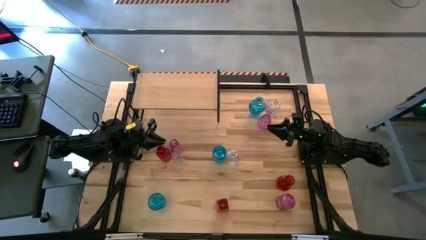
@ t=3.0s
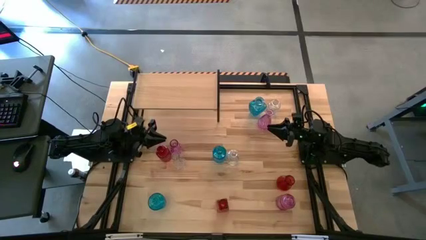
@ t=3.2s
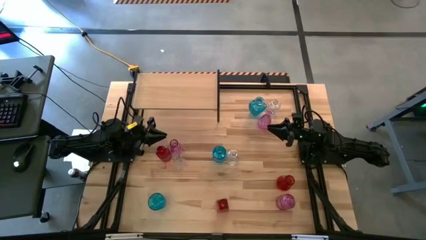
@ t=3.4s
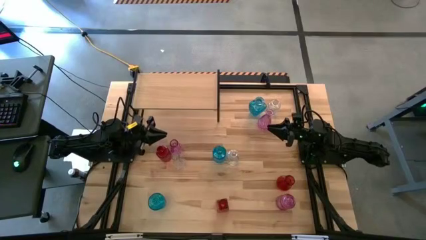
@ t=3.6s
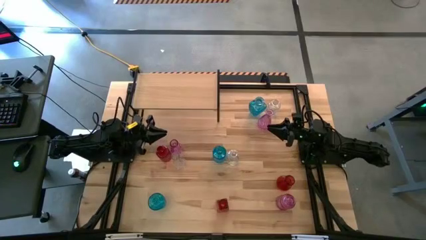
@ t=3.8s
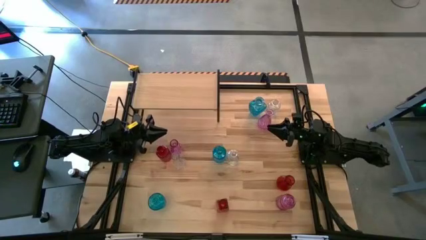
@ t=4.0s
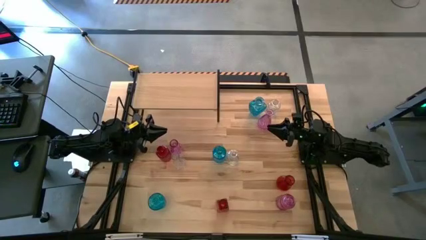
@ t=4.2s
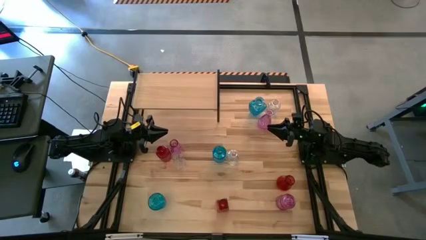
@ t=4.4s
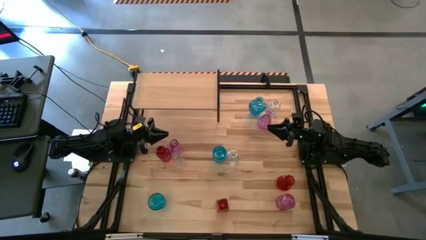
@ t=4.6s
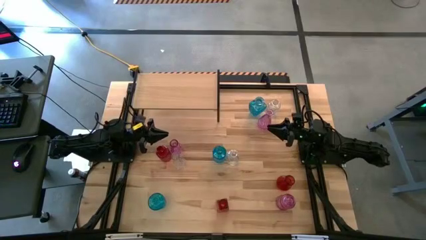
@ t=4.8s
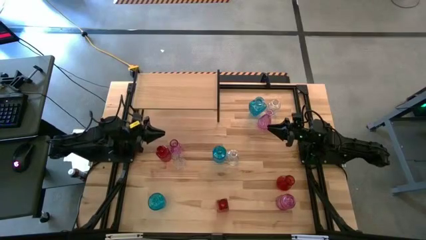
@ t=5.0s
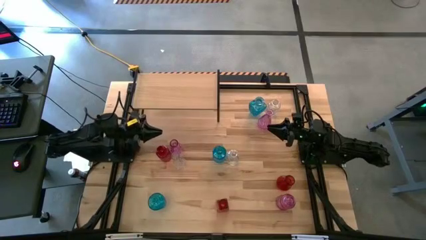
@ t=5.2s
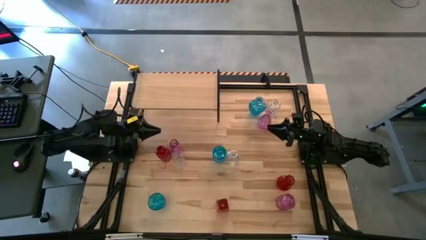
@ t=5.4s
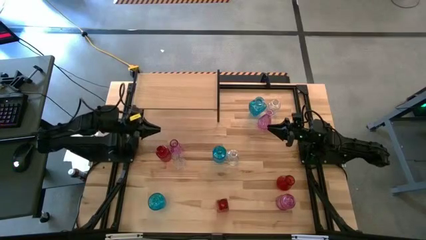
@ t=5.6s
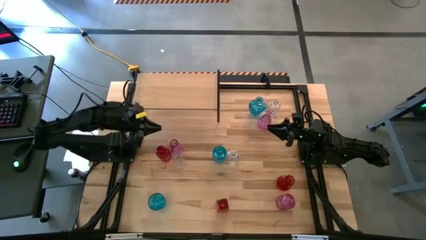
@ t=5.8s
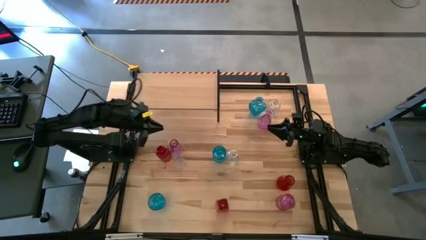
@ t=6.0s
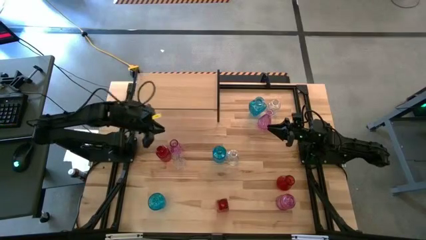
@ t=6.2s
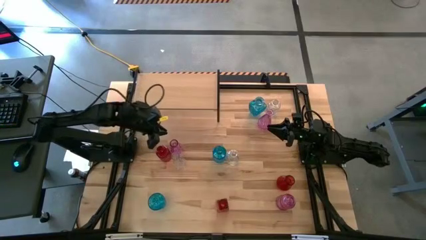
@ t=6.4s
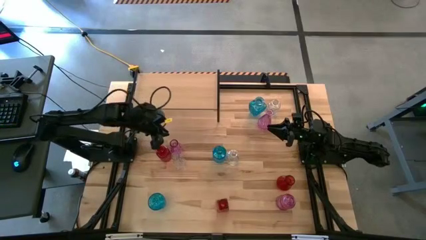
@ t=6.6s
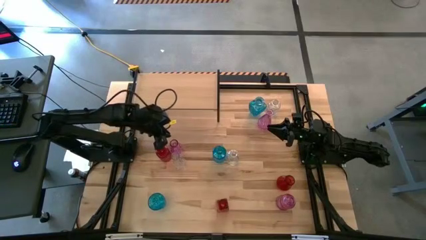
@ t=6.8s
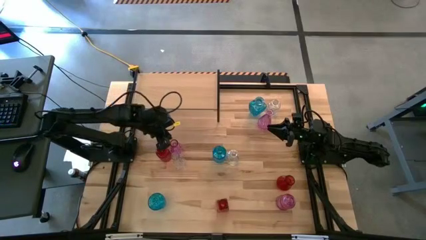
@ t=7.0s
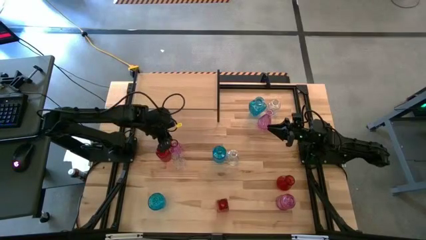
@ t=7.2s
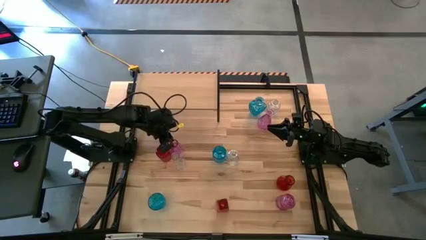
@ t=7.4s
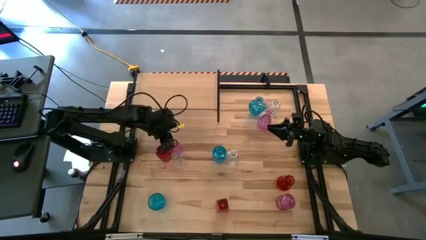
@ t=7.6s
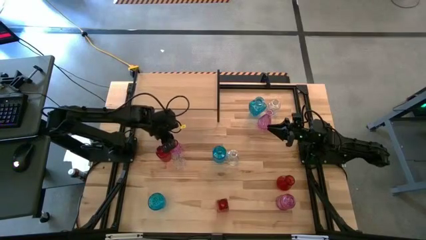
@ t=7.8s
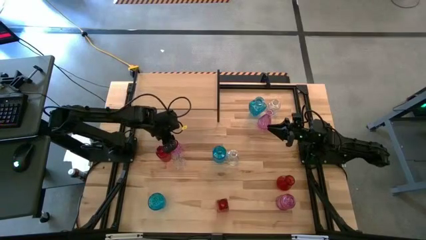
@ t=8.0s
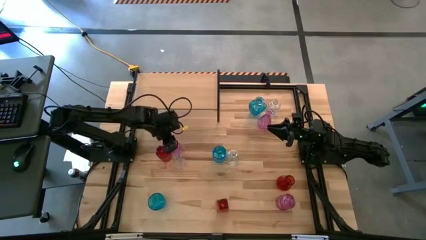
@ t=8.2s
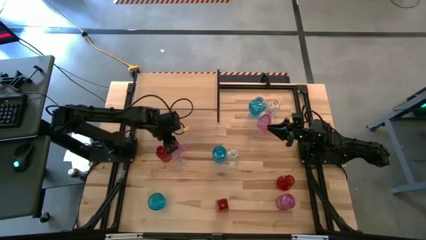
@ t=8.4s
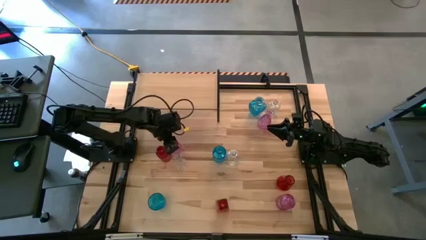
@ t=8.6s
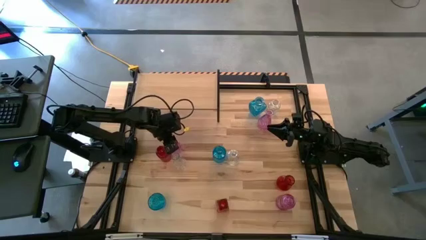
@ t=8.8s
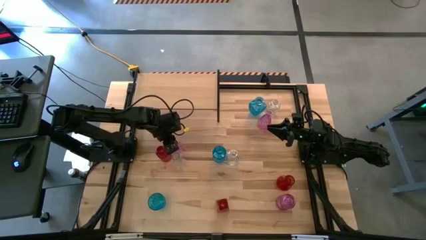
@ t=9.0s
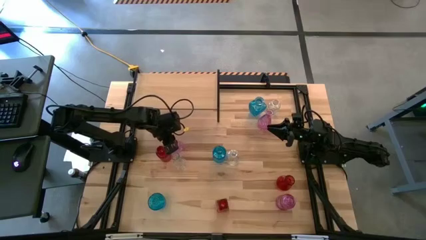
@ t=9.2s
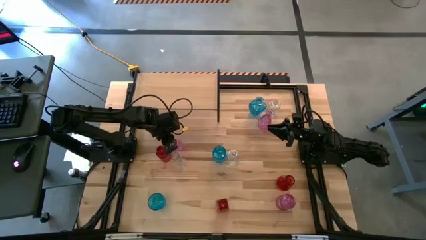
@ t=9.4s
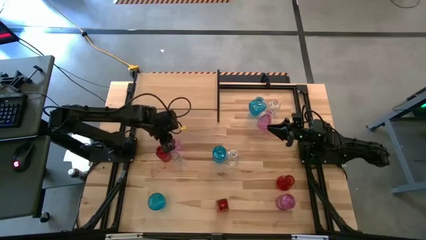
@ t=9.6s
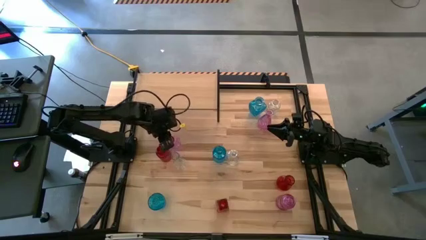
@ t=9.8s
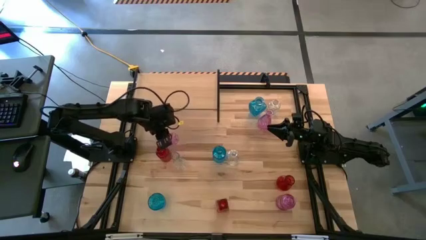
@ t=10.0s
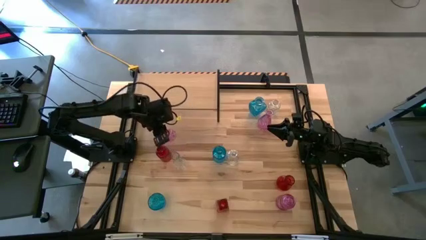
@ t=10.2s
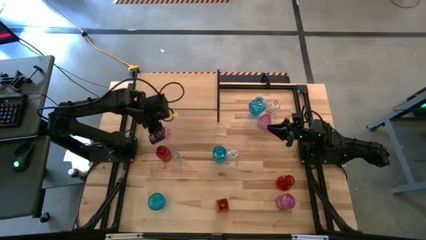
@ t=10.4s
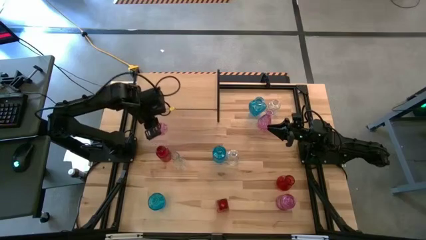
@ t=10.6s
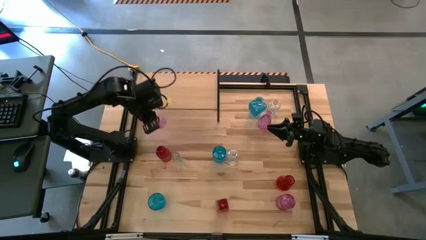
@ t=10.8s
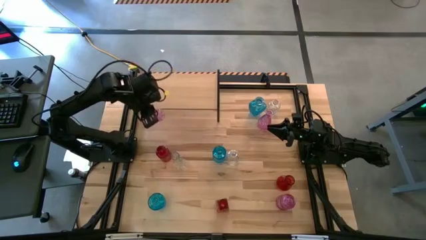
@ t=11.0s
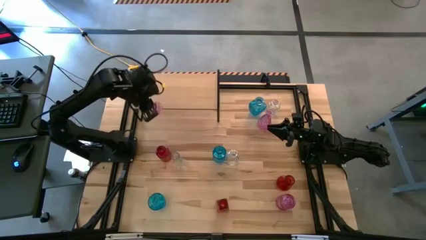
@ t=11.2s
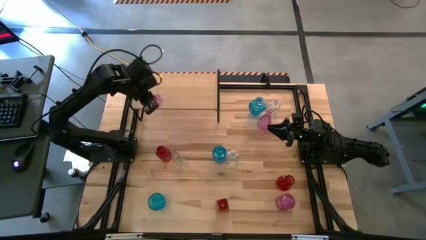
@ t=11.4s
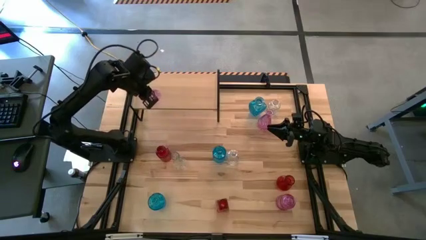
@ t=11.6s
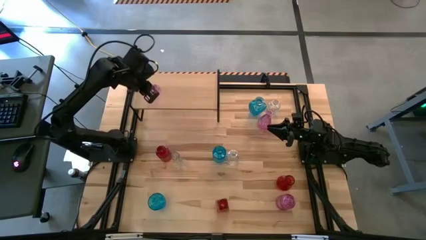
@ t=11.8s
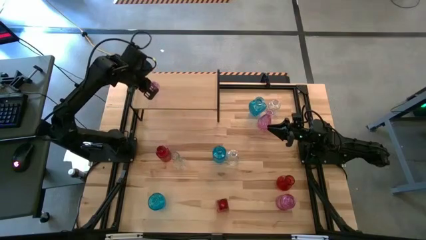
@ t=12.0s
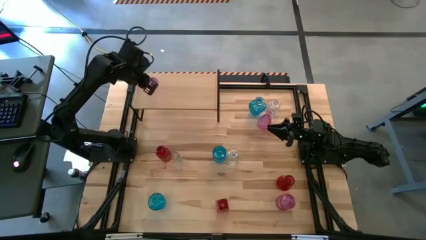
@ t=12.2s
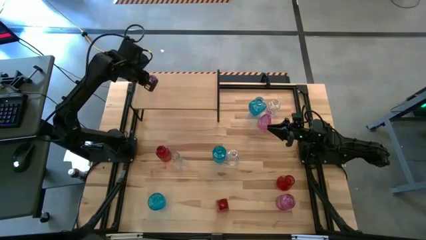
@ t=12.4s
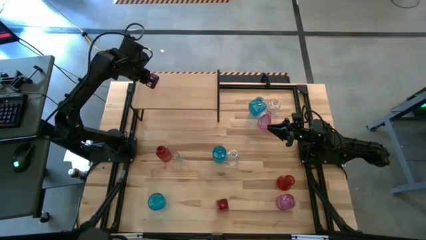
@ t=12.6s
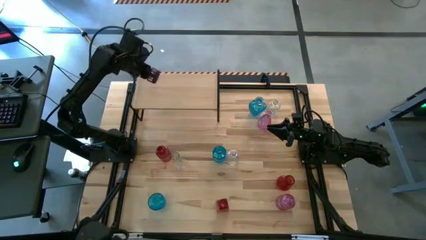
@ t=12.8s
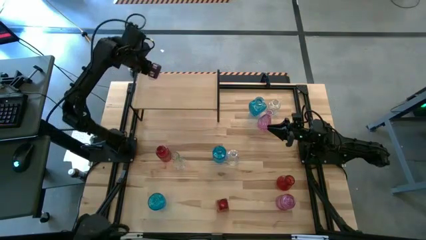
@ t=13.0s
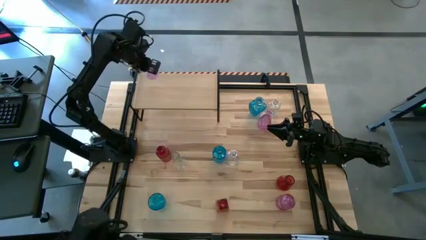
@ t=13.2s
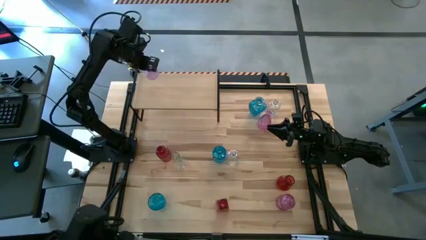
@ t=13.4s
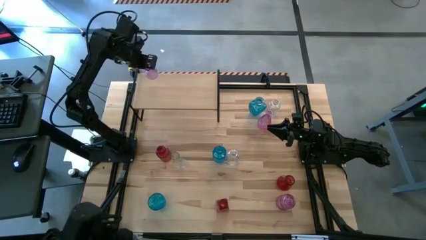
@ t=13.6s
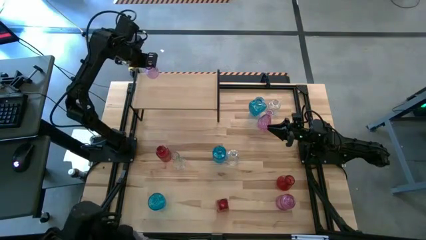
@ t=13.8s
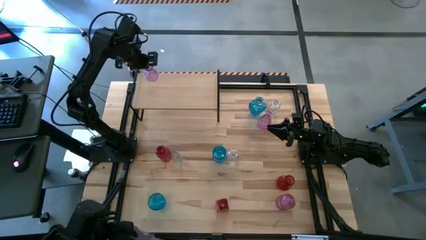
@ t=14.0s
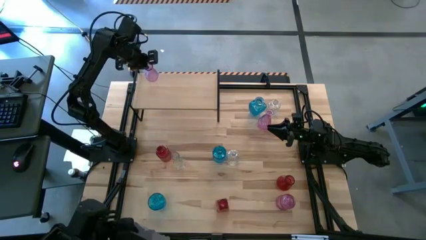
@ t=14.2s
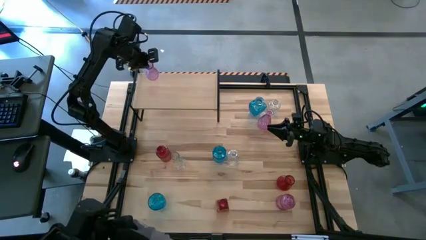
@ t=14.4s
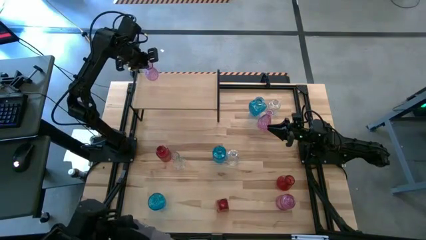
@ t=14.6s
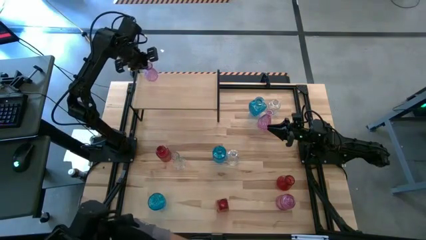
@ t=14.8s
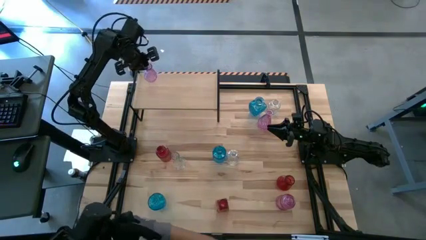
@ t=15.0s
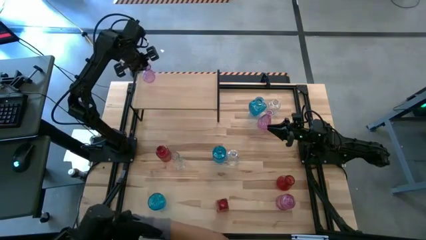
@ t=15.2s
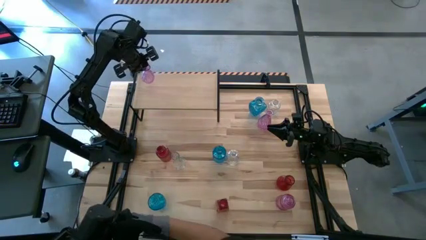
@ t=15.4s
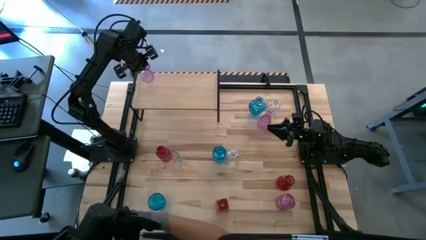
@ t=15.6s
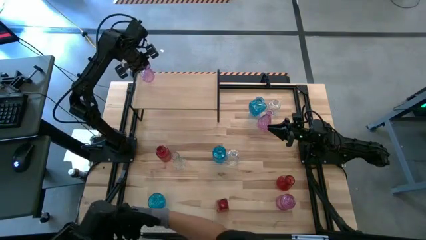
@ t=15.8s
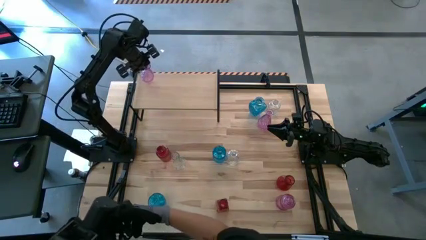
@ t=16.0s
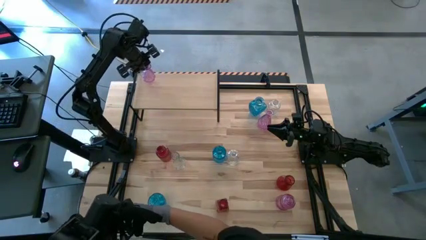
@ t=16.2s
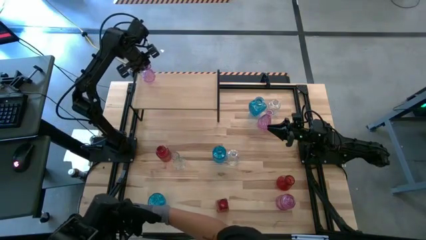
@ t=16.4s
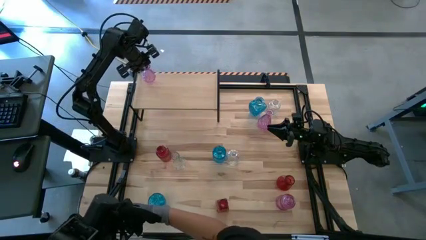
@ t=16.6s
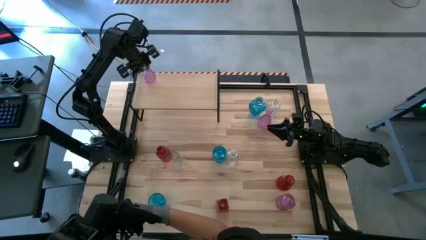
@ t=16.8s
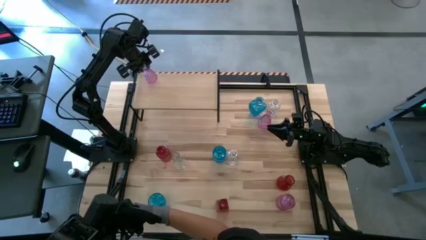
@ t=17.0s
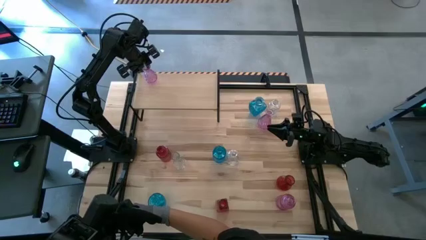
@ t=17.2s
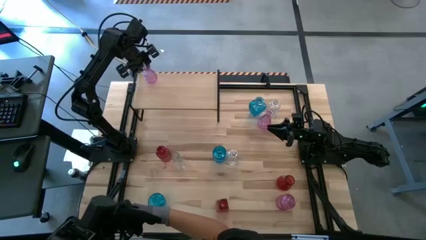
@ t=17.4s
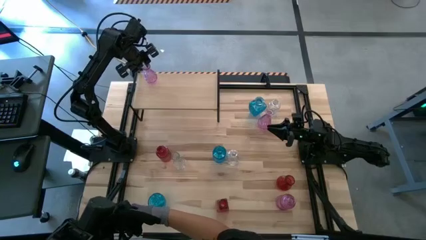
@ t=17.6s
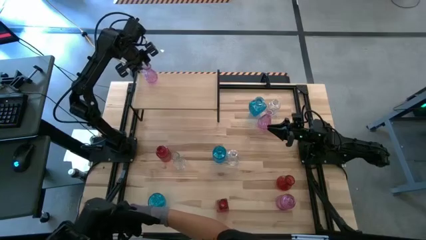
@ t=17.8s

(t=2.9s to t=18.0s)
Task: sort vases onto shelf
Put the middle left purple vase on the shelf
